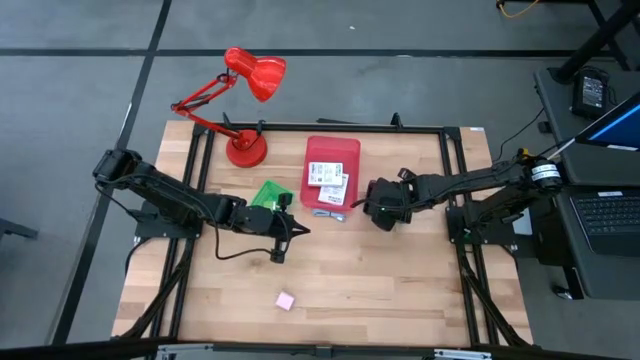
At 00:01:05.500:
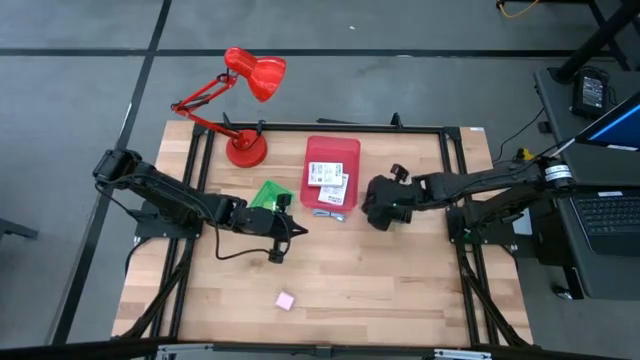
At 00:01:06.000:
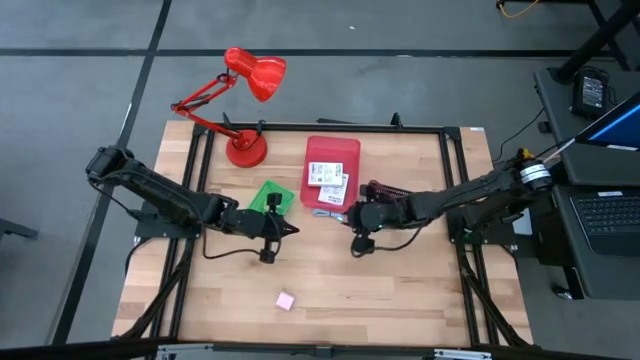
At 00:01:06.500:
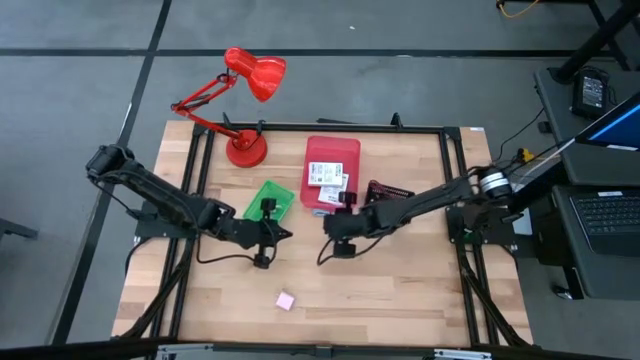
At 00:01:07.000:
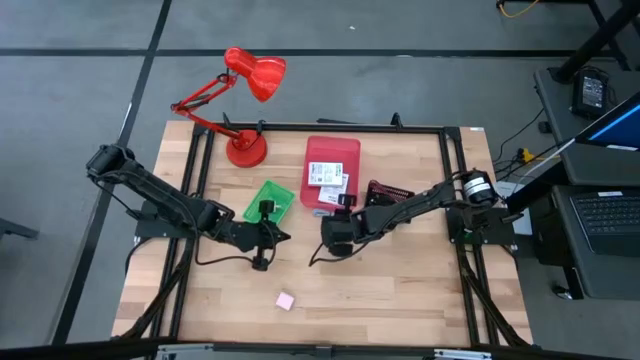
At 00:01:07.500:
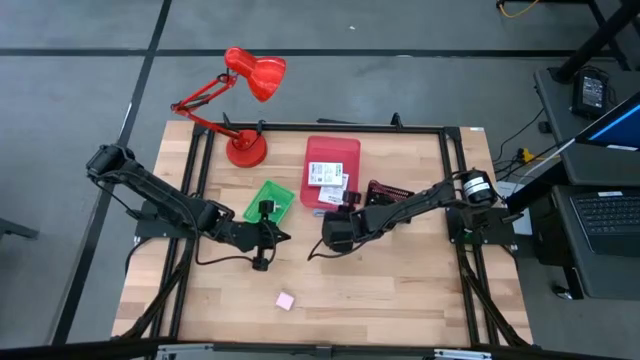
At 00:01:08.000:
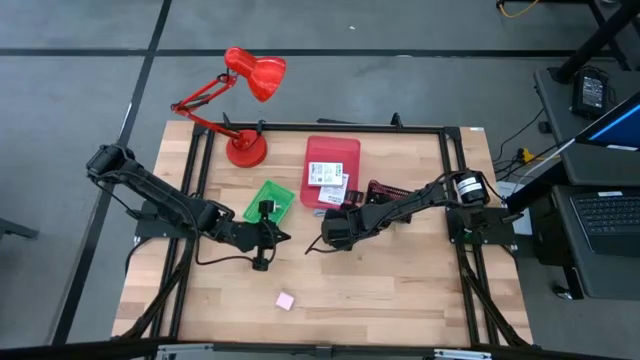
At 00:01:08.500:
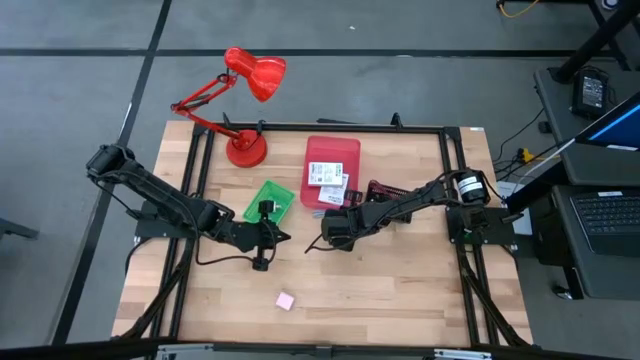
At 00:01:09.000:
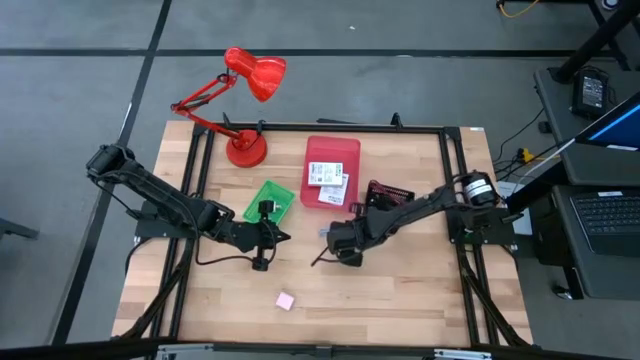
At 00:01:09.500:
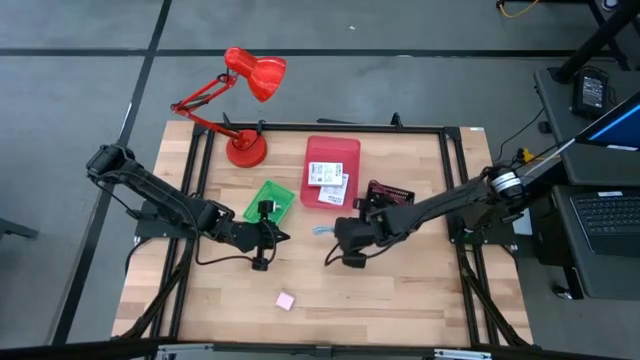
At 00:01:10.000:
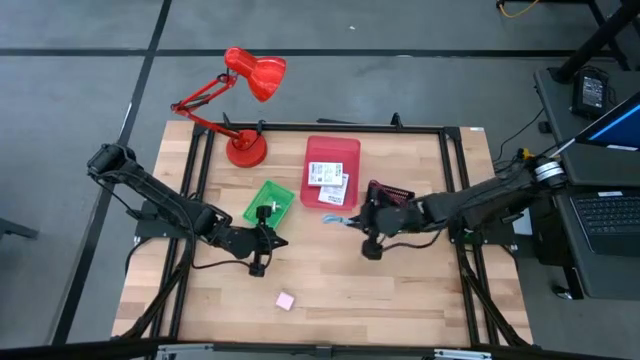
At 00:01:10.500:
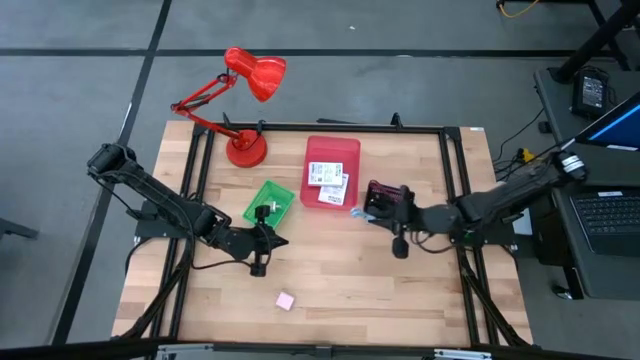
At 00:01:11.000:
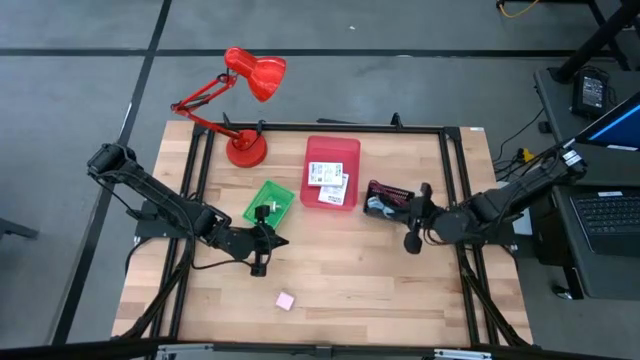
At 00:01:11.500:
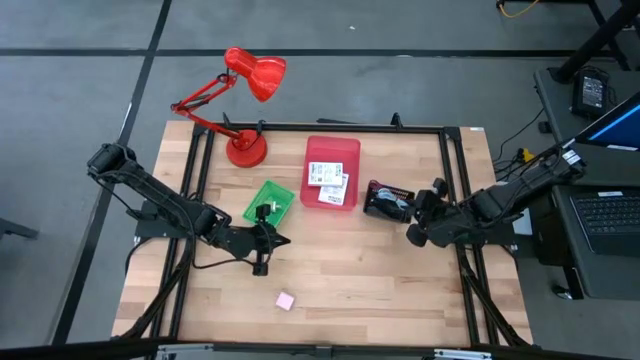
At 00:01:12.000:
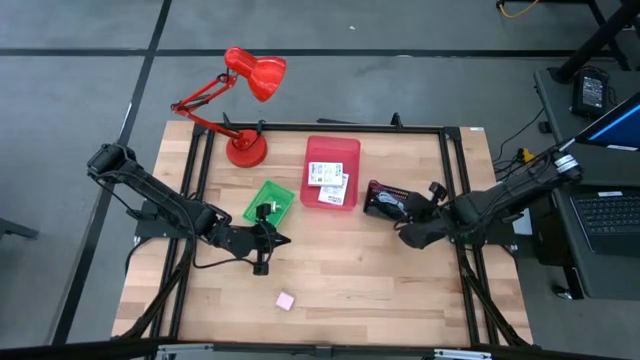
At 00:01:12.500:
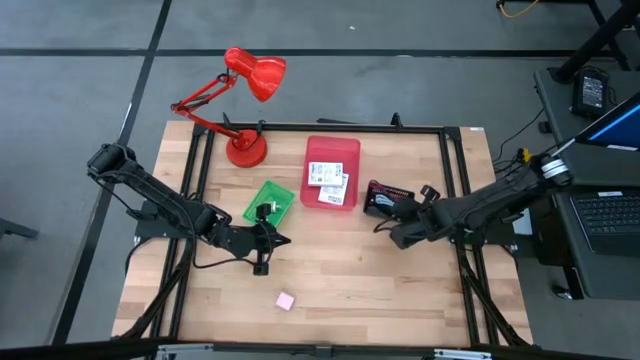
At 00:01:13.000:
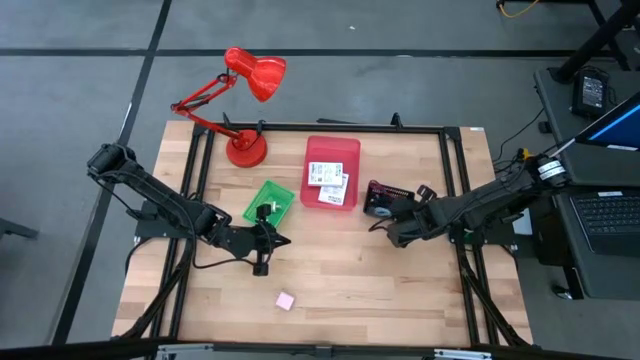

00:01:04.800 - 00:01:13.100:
Task: Pick and place items into bin
Put the blue charger cable into the black bin

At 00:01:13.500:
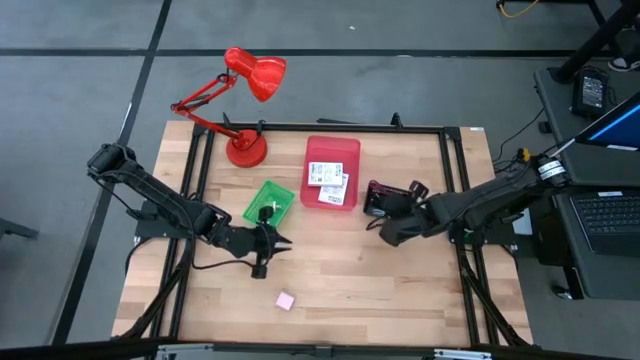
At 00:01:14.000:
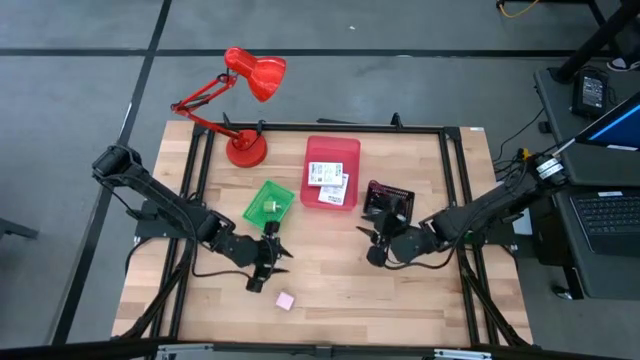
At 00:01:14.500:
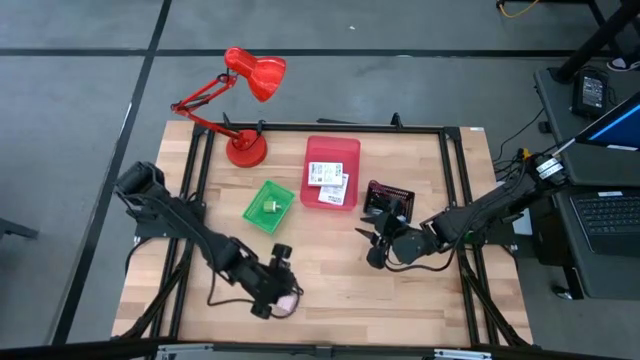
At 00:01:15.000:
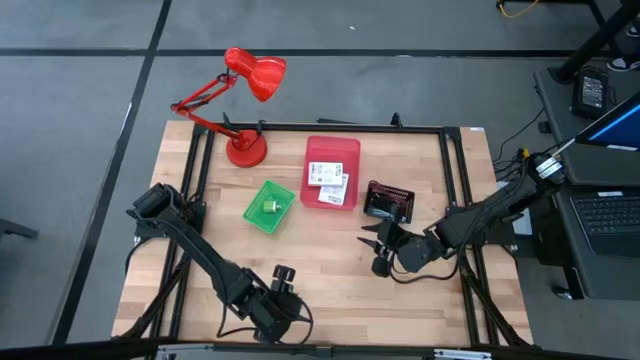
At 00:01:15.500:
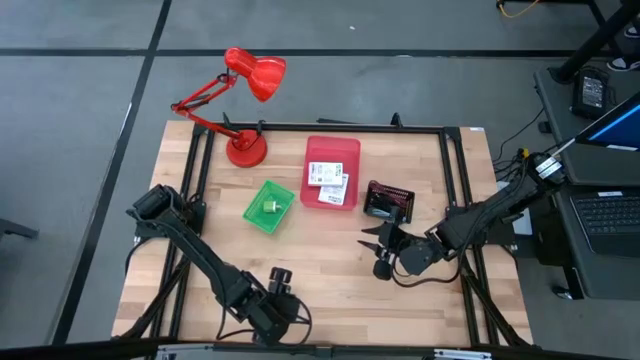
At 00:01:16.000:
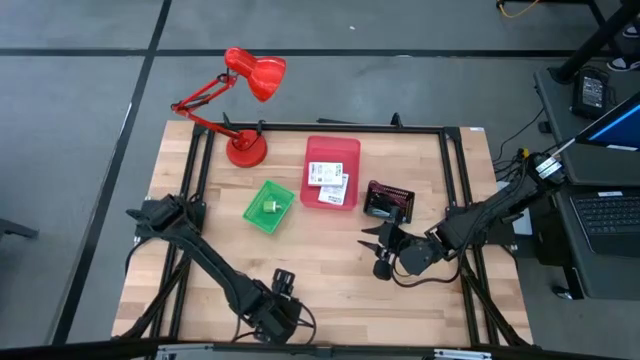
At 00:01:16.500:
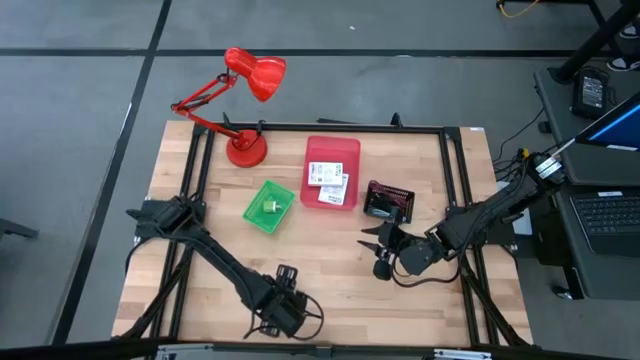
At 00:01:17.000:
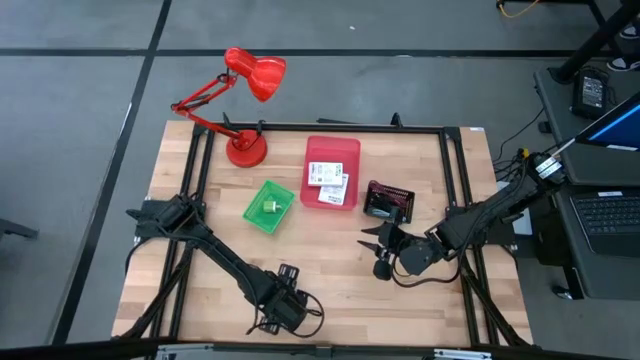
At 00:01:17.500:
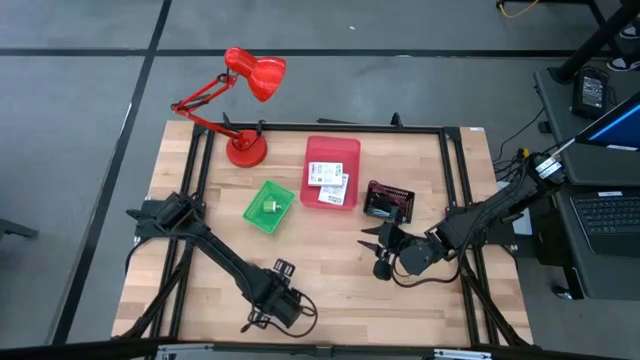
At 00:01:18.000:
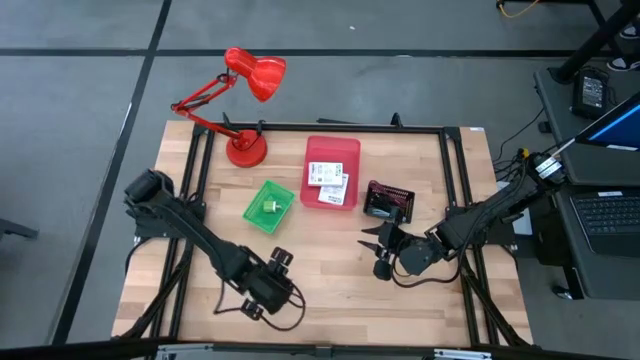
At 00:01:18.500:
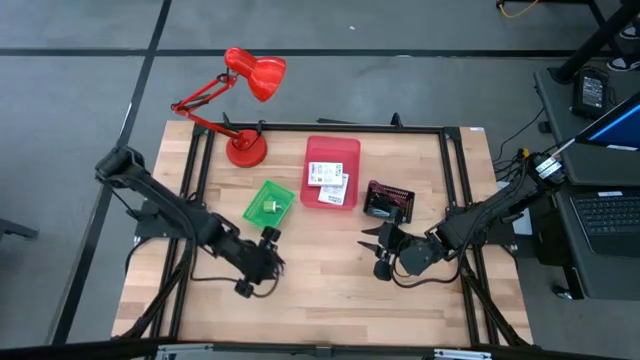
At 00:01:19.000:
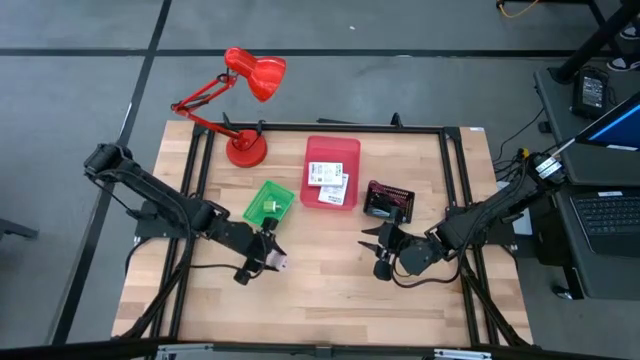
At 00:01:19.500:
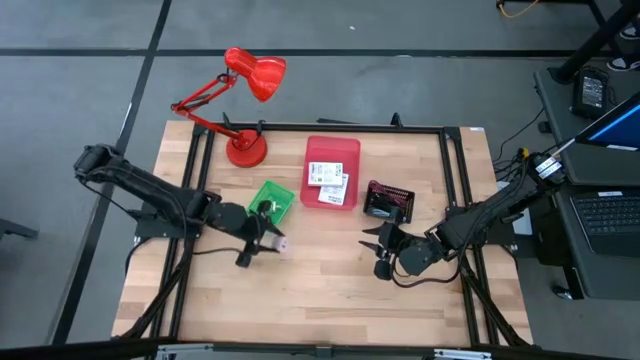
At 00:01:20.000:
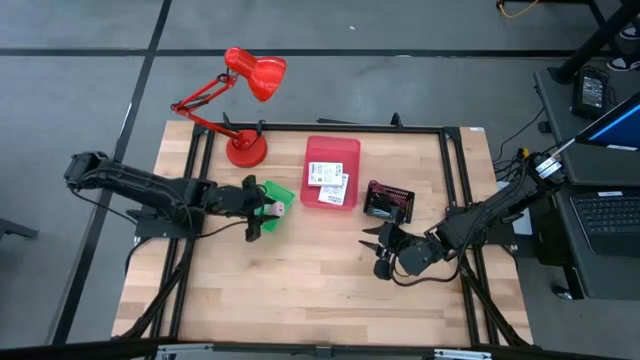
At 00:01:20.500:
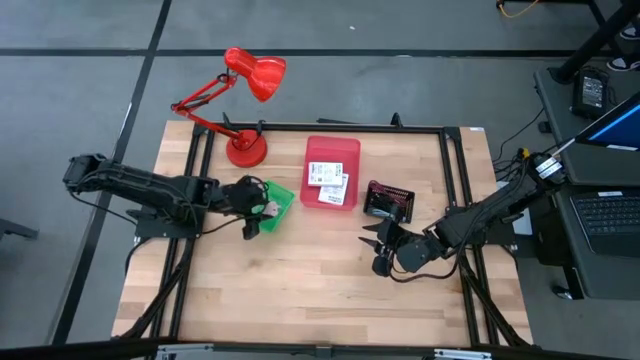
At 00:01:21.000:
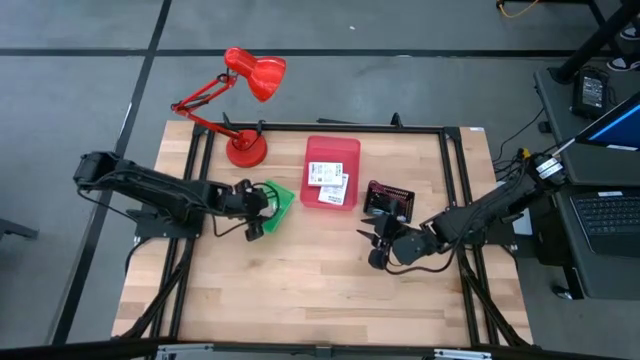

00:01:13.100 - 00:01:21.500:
Put the pink charger adapter into the green bin

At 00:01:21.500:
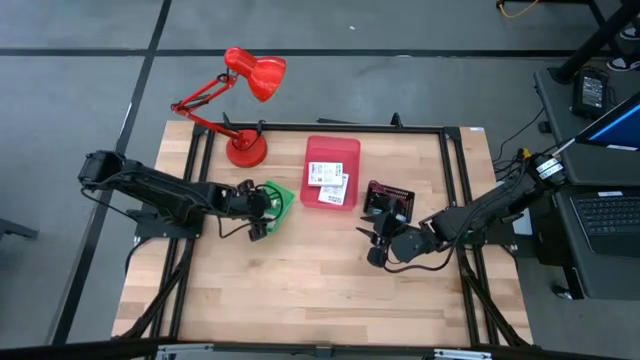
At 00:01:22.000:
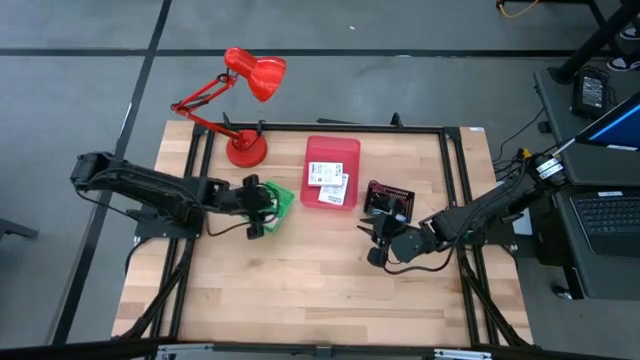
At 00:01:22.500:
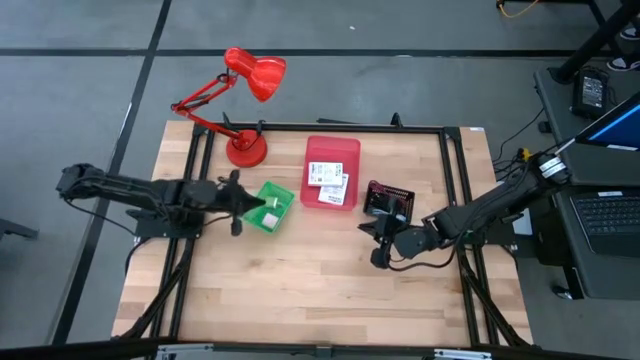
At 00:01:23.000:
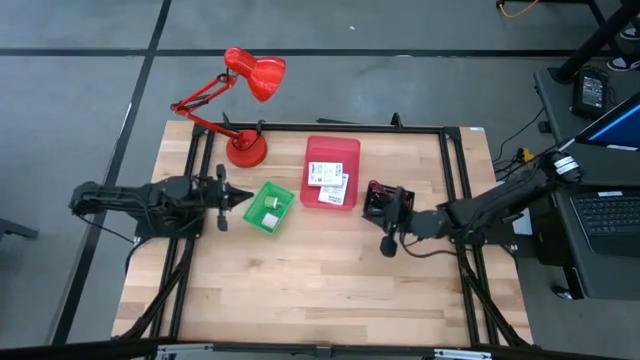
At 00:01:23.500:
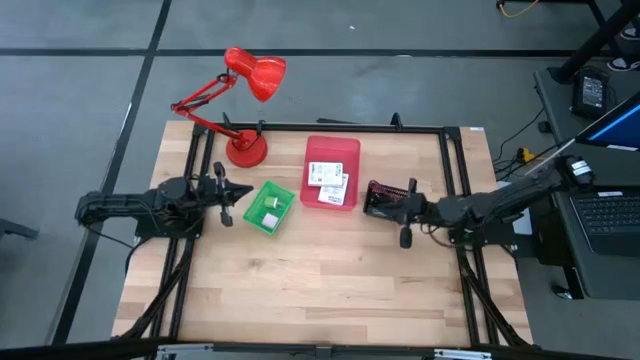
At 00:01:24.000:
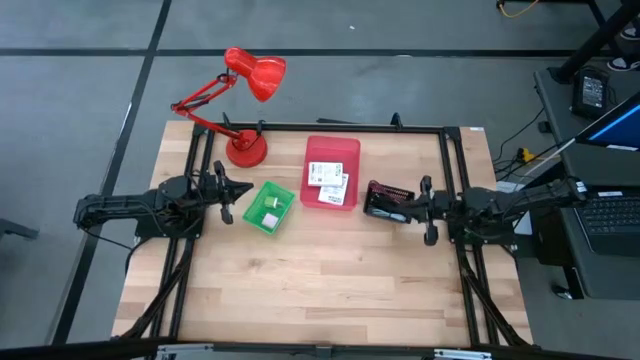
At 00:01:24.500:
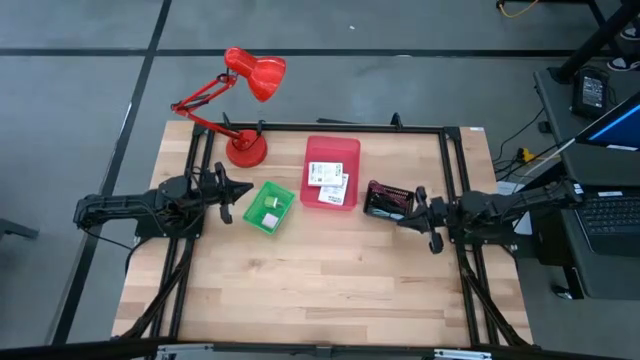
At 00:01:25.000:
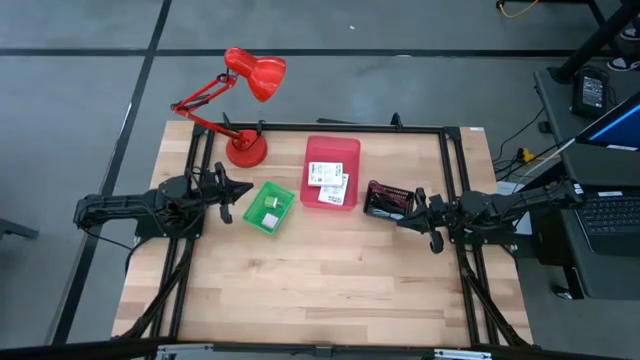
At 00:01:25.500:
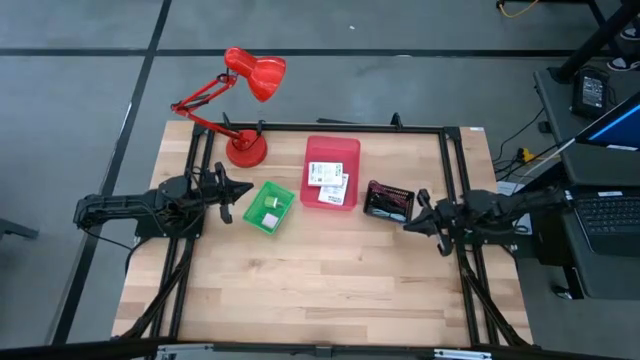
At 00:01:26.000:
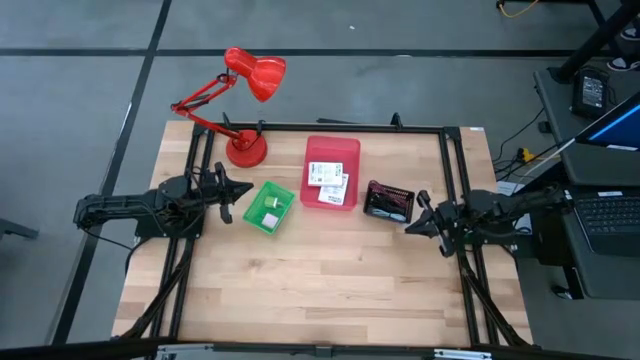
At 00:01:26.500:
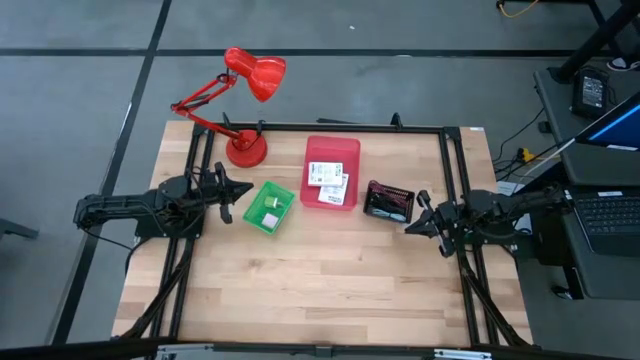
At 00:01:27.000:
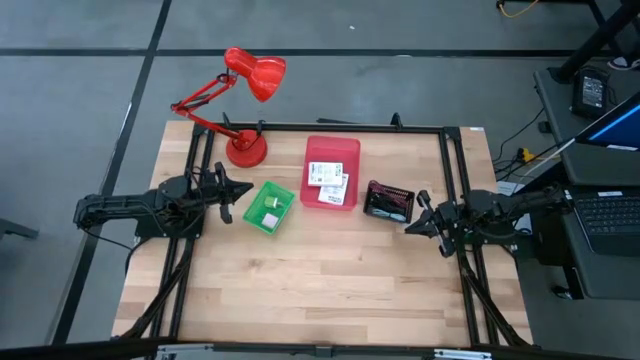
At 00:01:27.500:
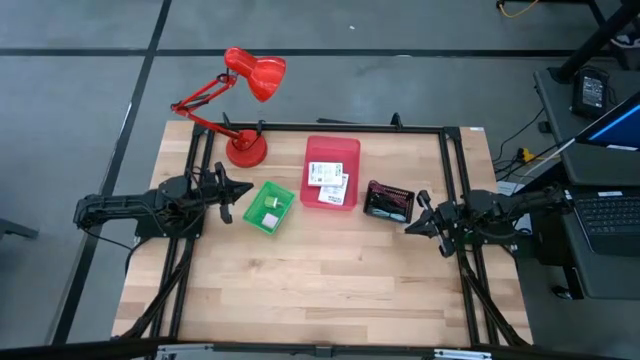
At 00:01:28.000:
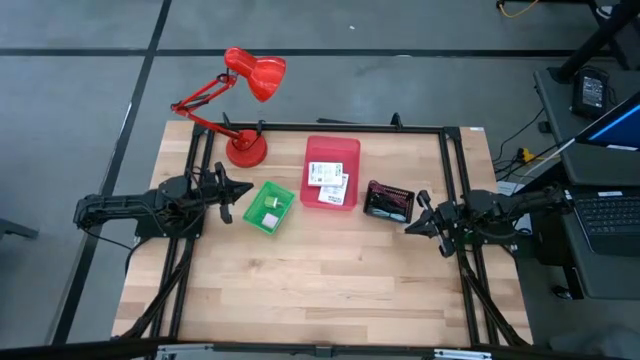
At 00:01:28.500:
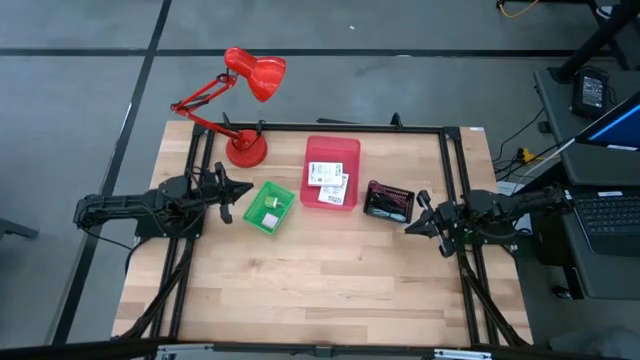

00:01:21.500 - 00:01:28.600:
Return to Home Position
